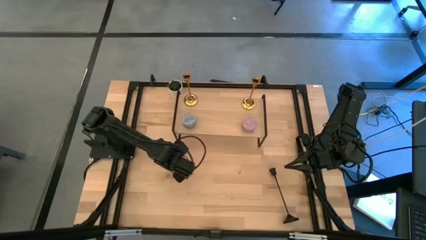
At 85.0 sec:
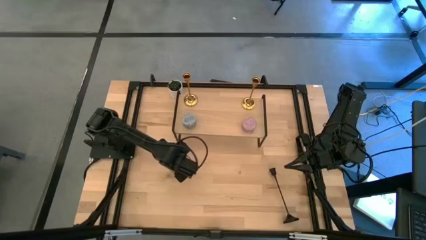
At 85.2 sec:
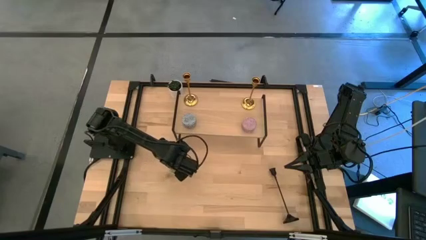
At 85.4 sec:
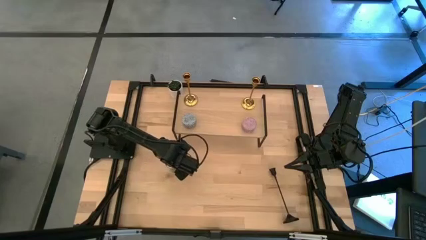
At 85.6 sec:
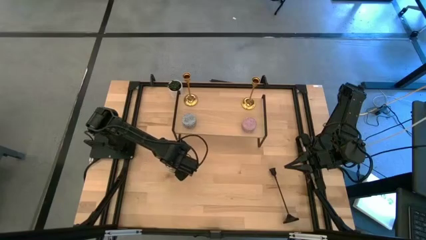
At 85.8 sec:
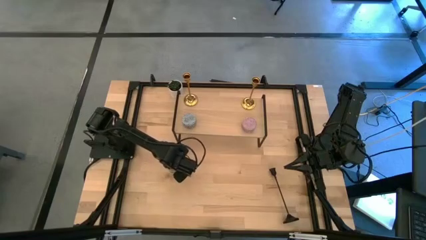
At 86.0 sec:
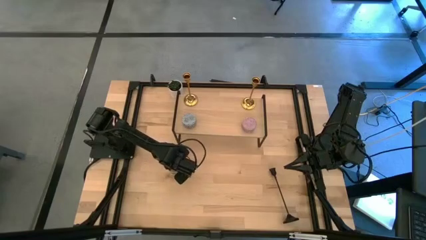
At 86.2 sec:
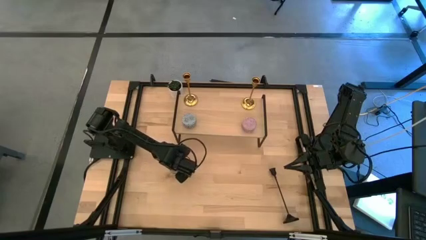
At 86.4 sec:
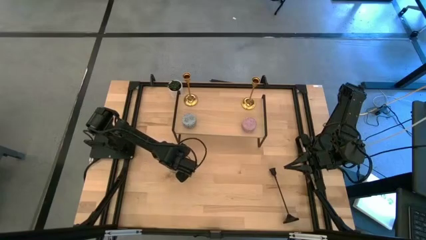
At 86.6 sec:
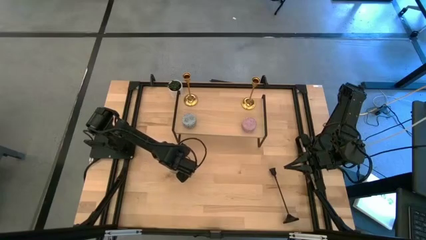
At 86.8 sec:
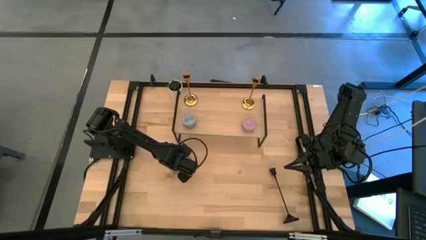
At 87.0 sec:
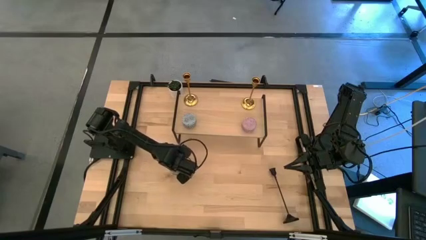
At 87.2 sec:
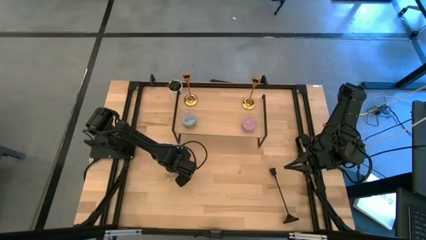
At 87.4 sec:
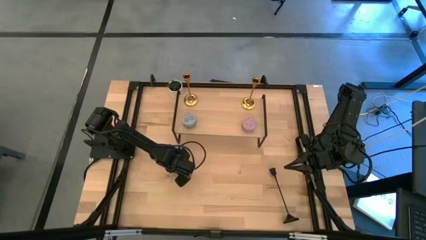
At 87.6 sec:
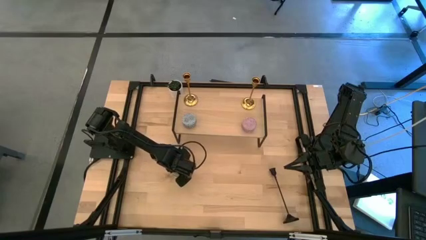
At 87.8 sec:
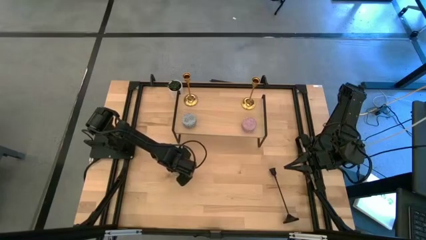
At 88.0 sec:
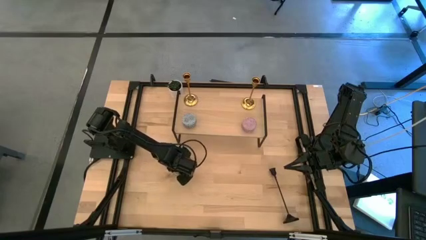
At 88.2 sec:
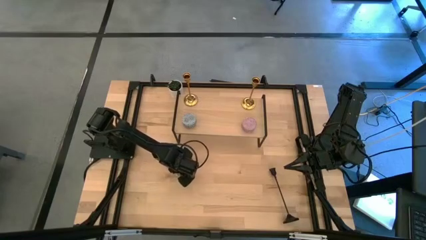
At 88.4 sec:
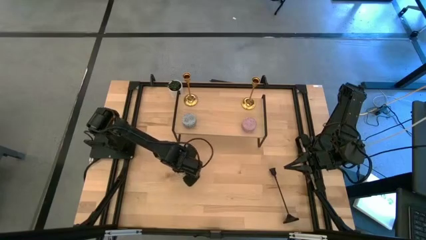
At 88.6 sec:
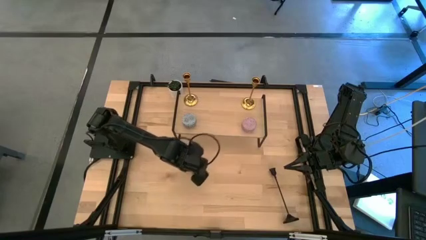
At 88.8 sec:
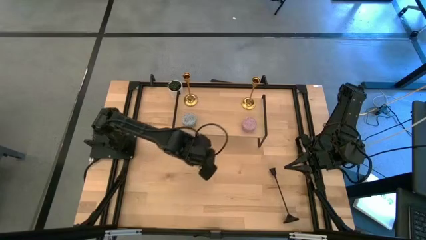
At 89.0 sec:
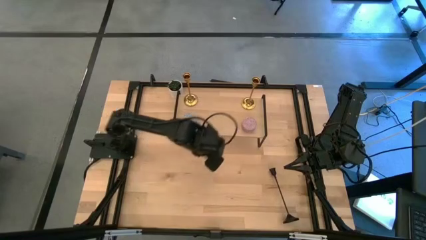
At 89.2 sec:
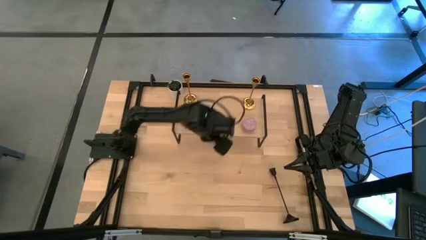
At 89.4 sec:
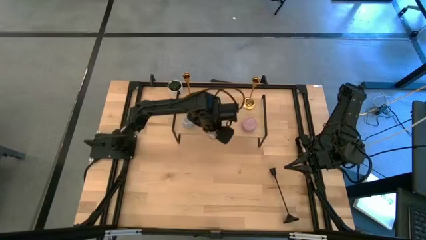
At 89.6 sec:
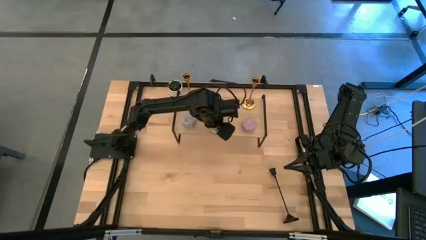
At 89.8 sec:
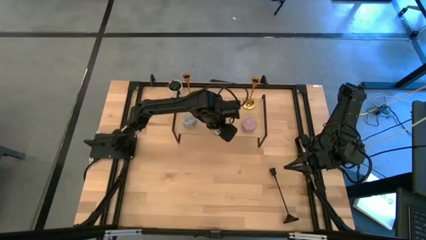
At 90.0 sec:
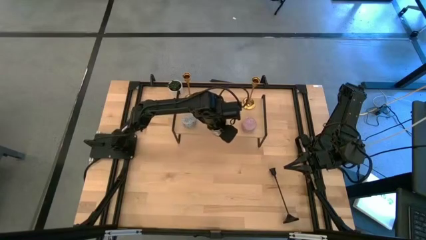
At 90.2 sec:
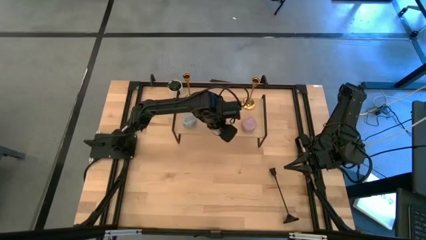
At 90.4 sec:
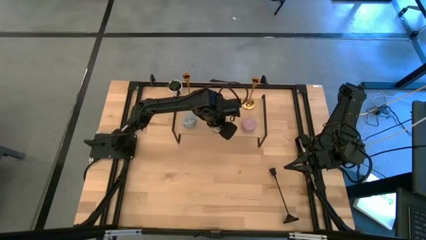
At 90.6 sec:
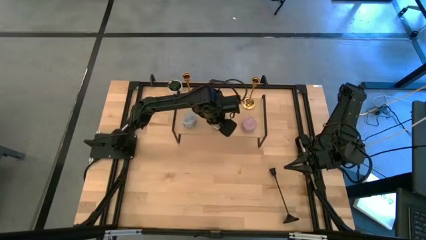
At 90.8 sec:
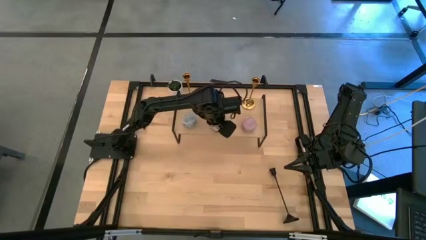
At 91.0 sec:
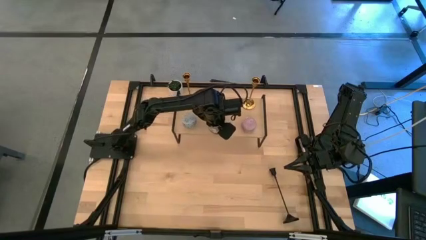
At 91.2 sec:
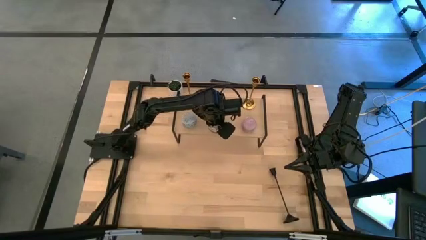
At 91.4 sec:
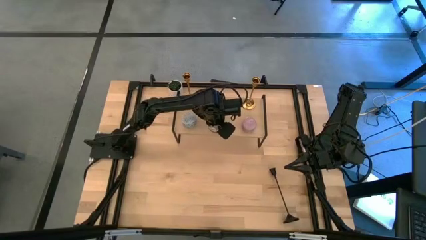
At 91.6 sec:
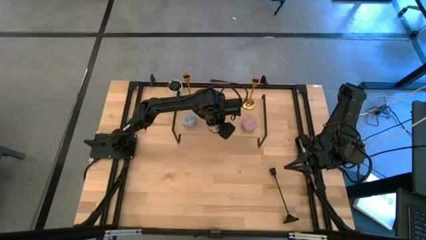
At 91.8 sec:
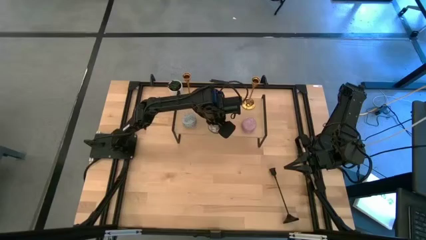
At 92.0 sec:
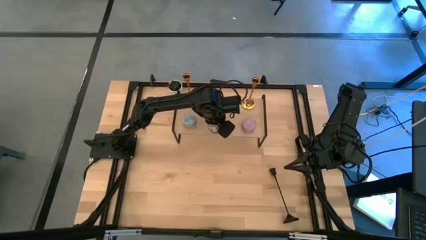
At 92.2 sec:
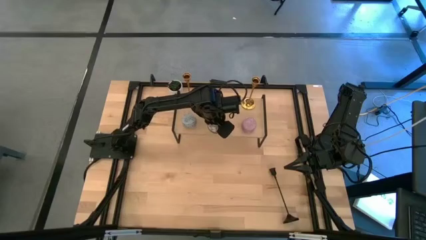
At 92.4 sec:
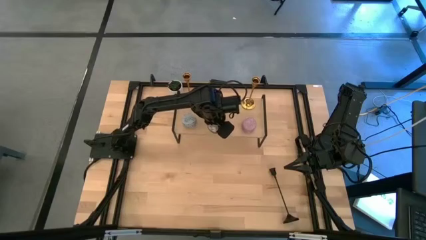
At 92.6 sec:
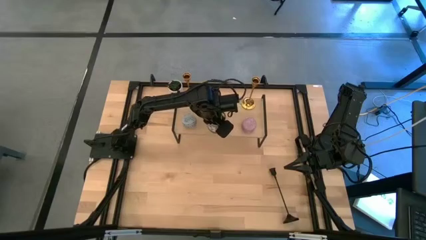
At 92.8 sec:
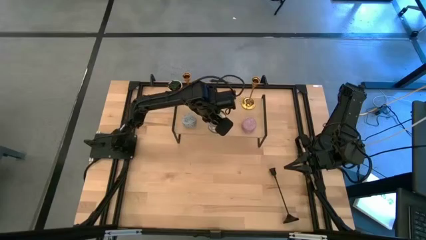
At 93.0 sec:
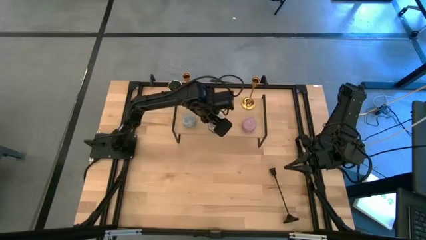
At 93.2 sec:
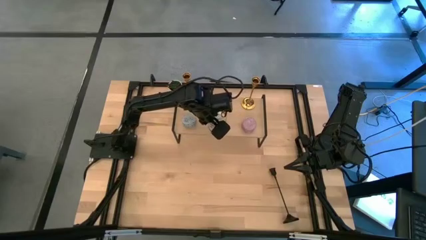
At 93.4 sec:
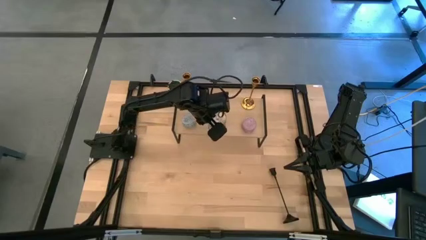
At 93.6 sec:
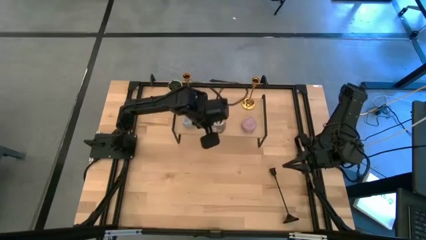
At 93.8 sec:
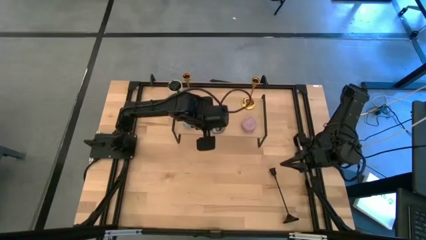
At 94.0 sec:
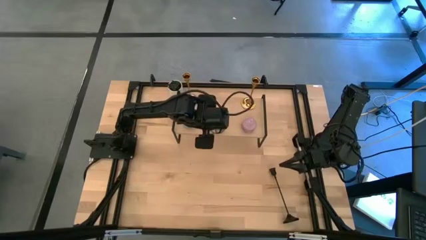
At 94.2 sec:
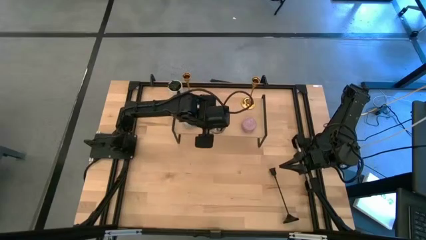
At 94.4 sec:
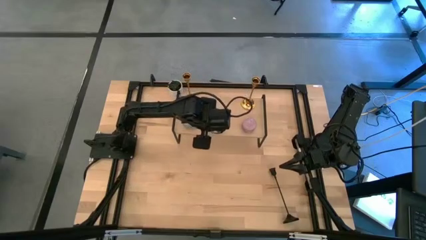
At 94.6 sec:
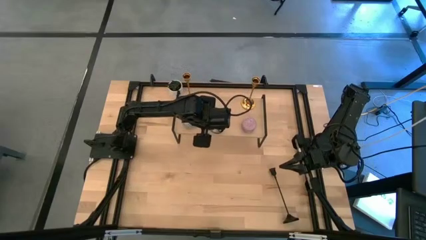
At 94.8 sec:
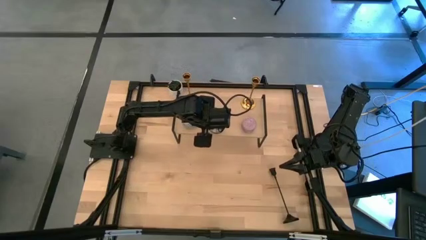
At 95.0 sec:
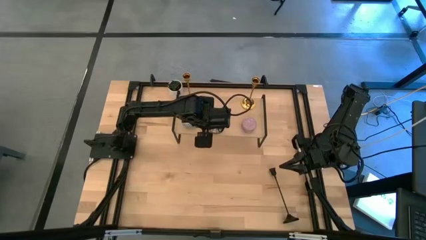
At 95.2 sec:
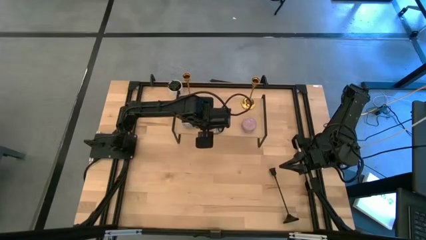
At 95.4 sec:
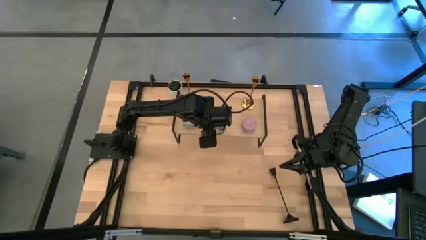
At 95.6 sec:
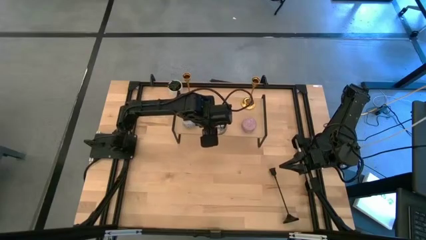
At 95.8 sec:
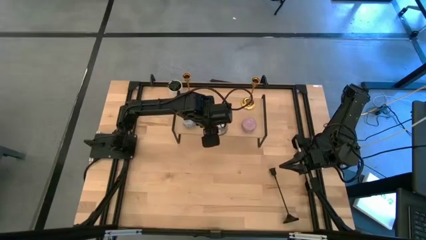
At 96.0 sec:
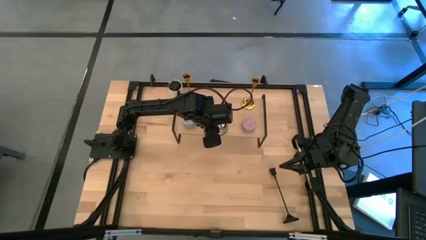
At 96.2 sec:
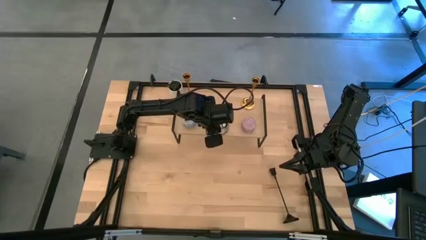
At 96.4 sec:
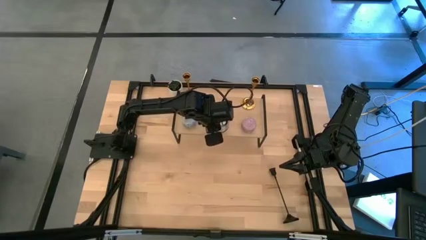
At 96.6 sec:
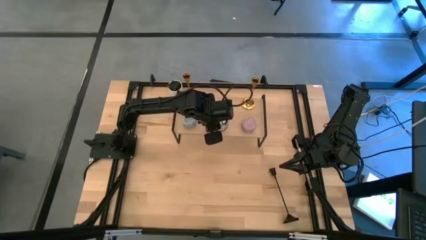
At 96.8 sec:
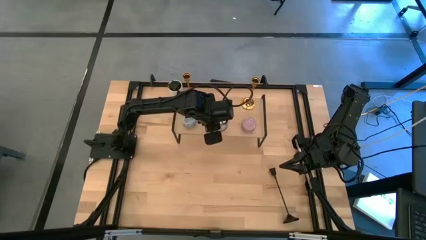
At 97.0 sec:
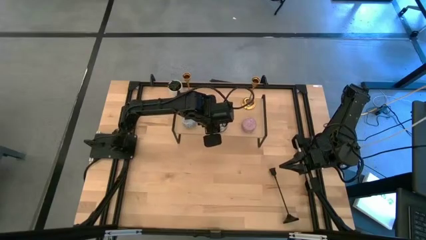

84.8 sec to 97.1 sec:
Task: Pick & Place candle stick holders
Put the silver scented candle on the shelf
